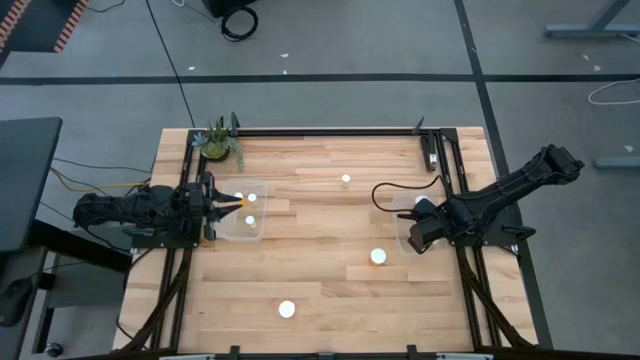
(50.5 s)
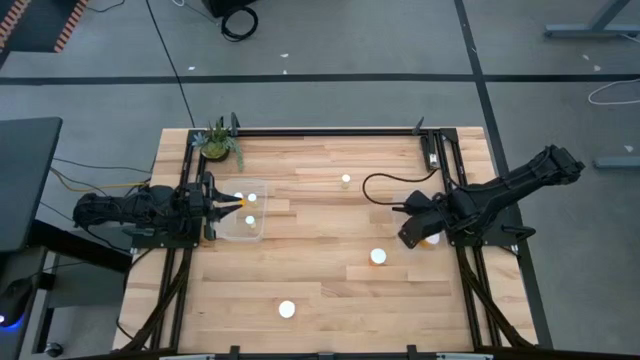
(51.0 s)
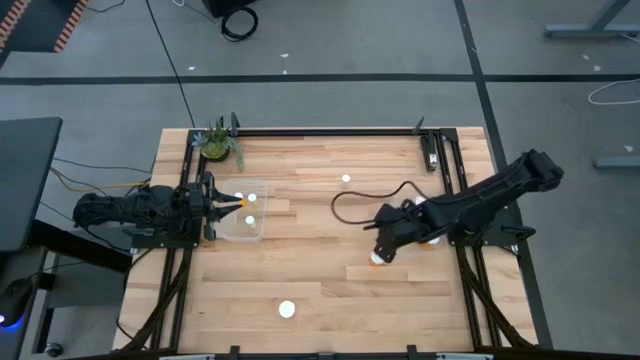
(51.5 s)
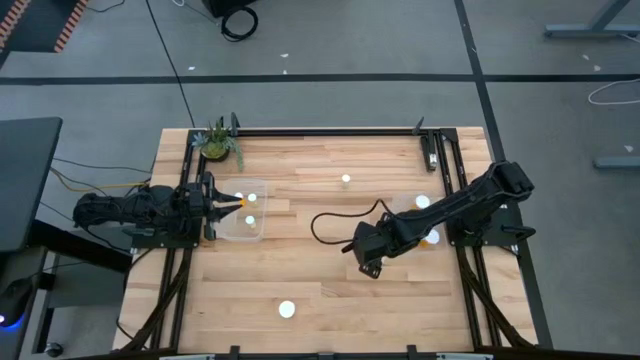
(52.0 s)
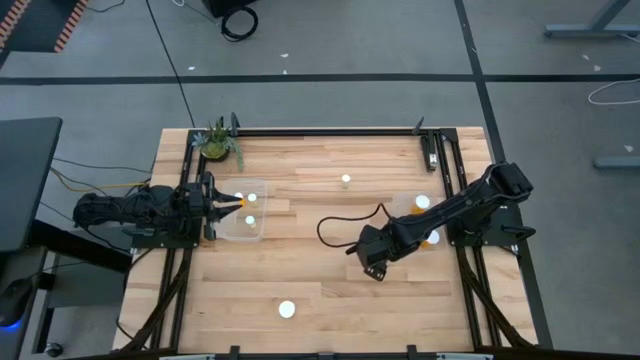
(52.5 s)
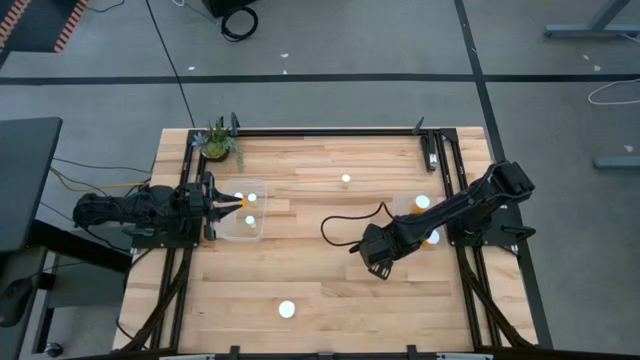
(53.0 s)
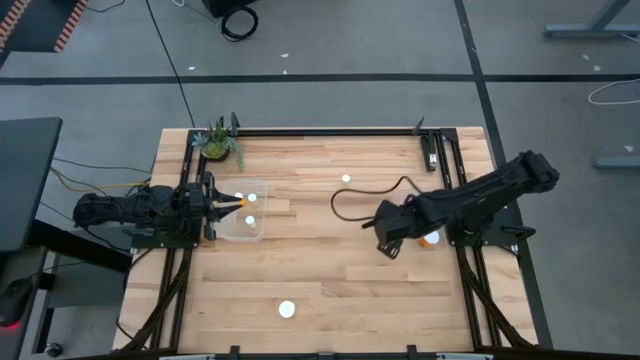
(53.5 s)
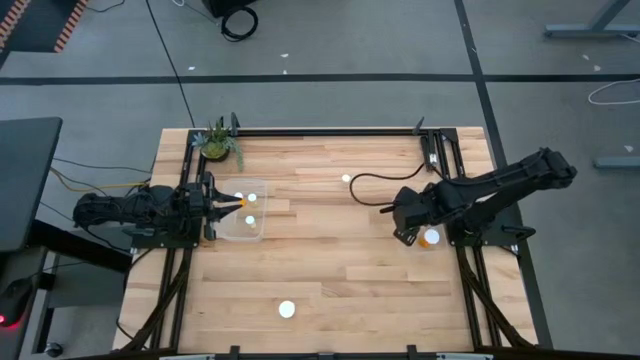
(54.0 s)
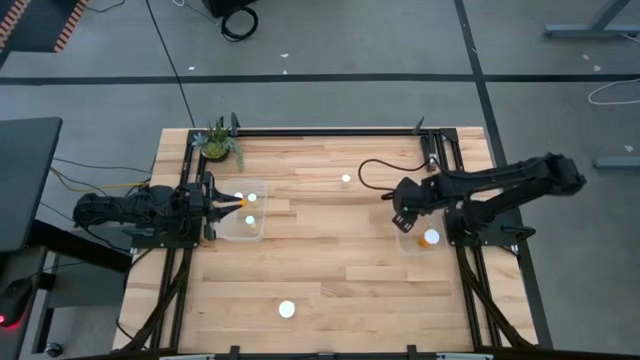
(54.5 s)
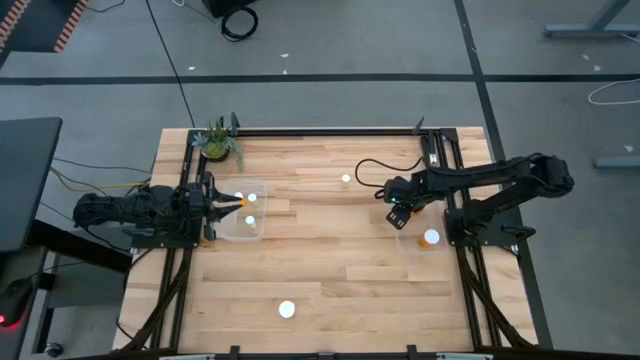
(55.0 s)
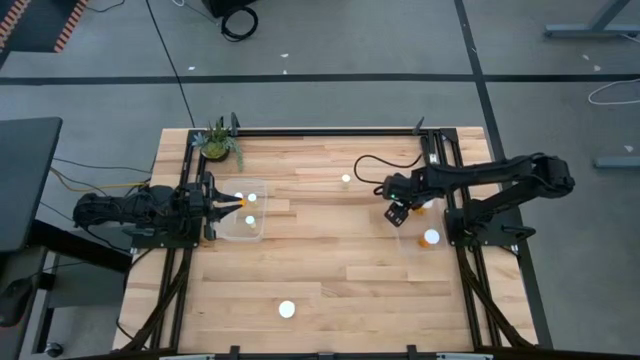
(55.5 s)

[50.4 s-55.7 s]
Task: Pick and place medicine bottles into bin by pill shape (circle, oval)
Put the large orange pill bottle into the right transparent bin

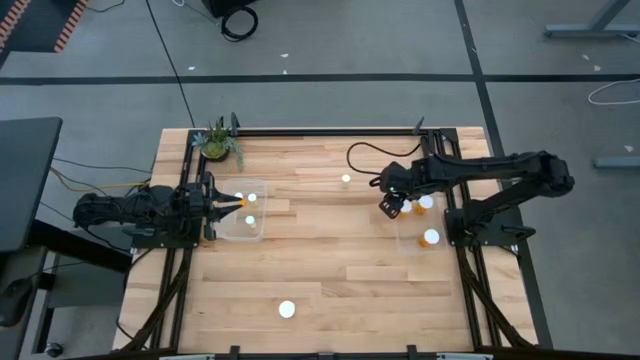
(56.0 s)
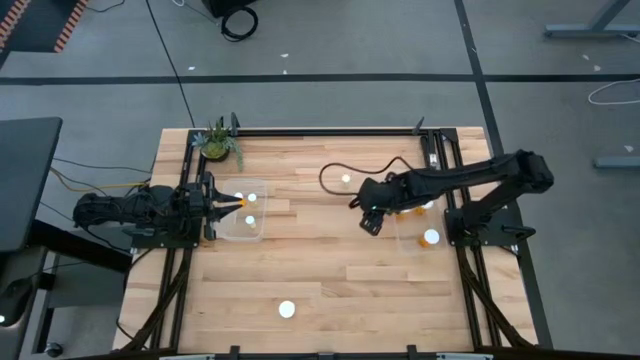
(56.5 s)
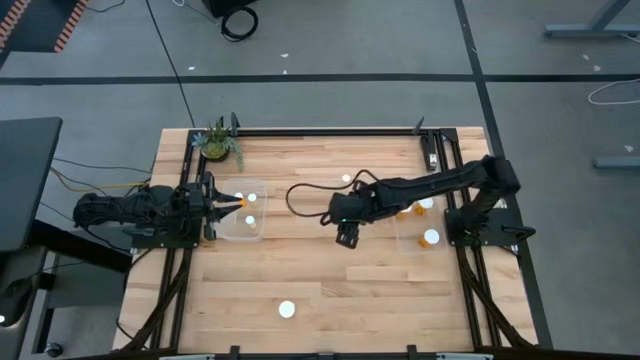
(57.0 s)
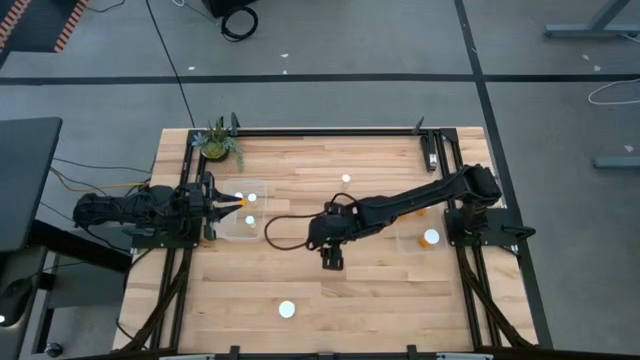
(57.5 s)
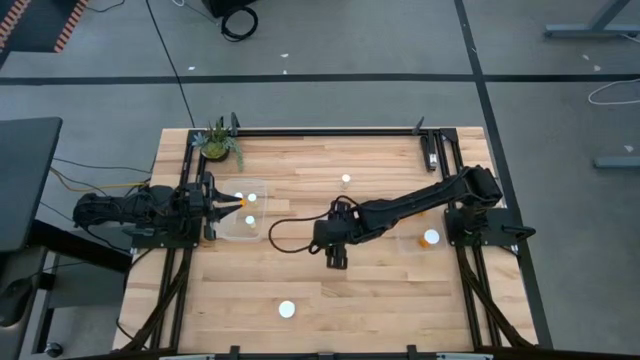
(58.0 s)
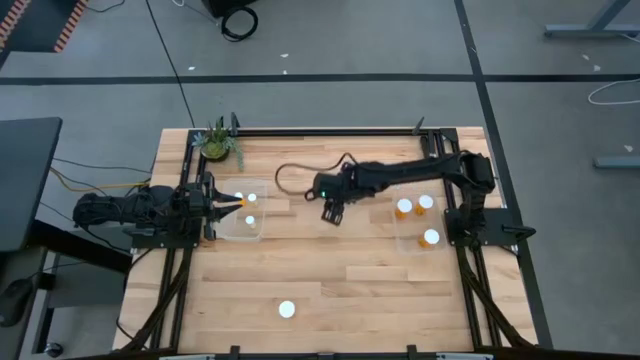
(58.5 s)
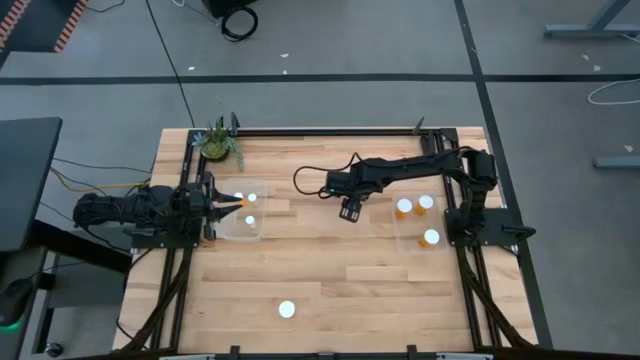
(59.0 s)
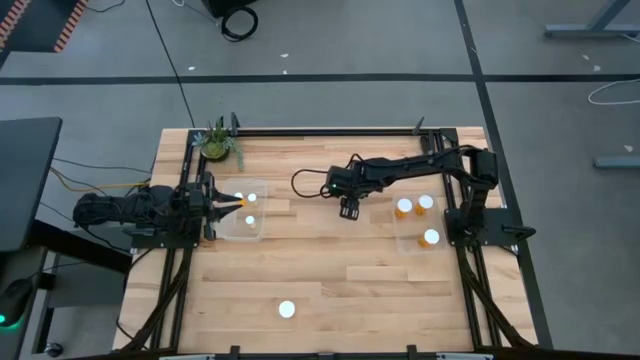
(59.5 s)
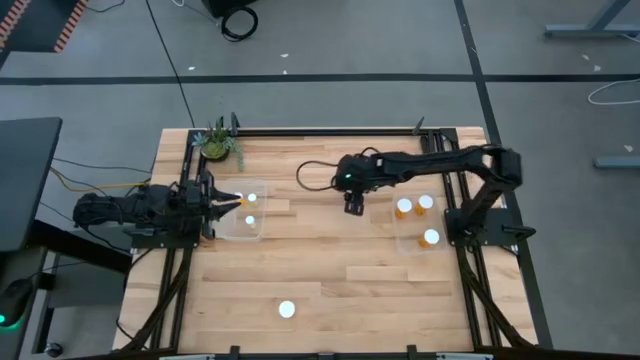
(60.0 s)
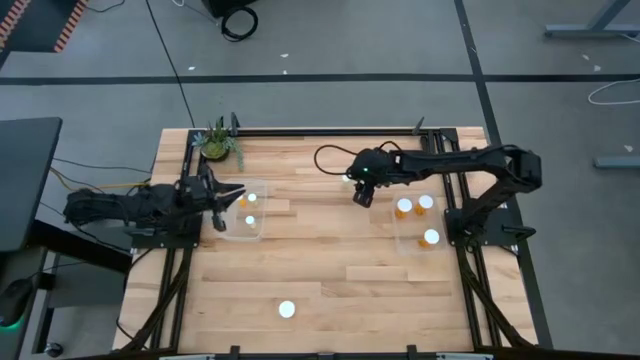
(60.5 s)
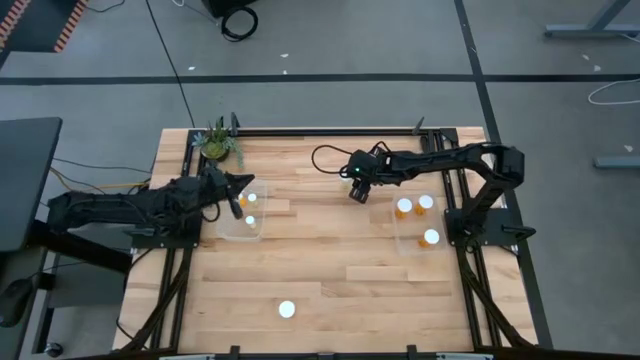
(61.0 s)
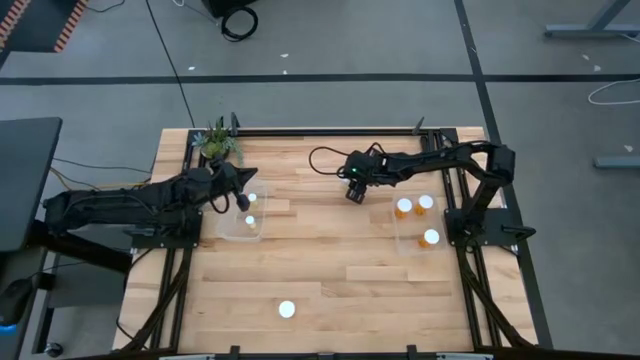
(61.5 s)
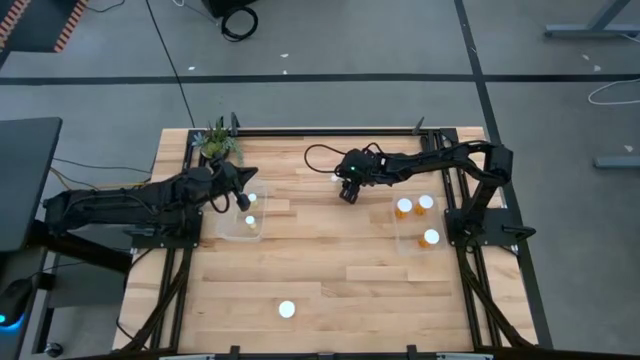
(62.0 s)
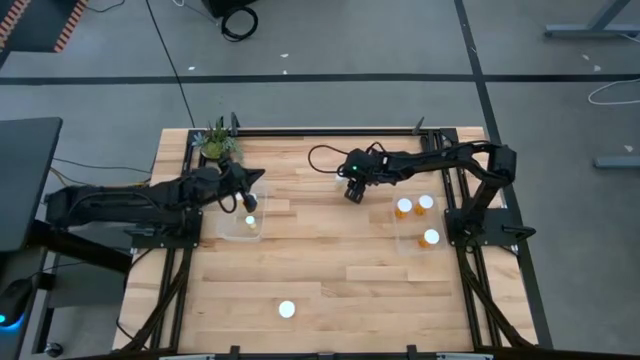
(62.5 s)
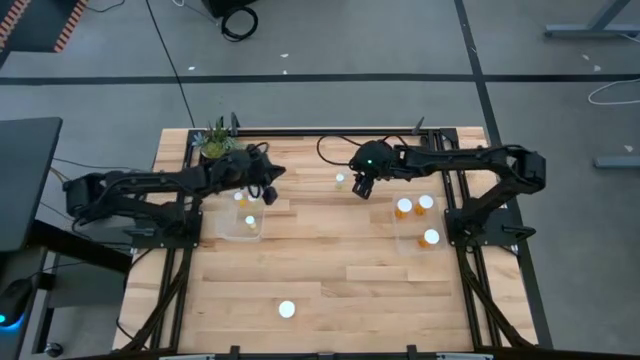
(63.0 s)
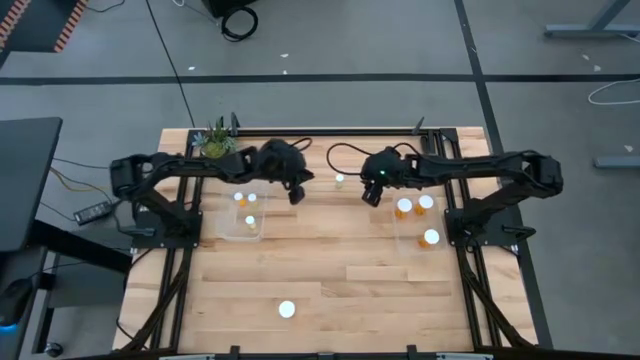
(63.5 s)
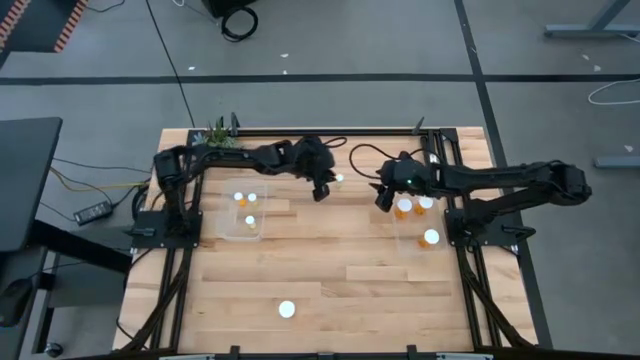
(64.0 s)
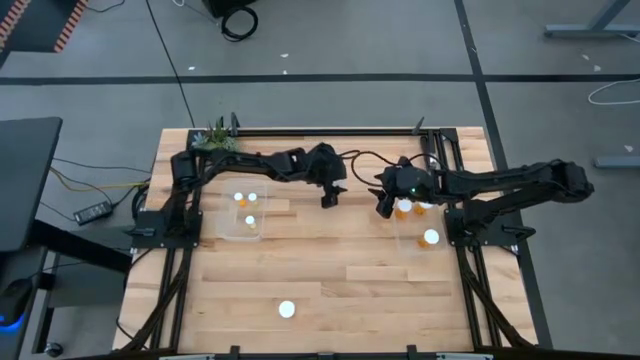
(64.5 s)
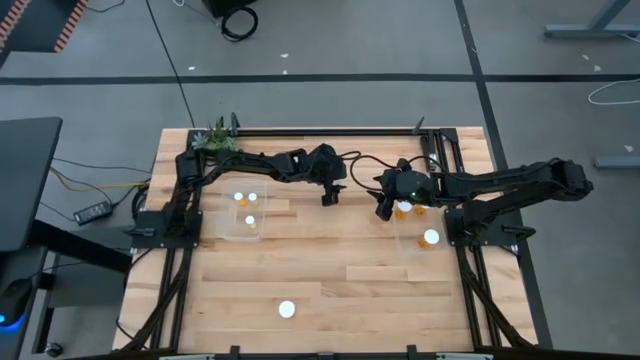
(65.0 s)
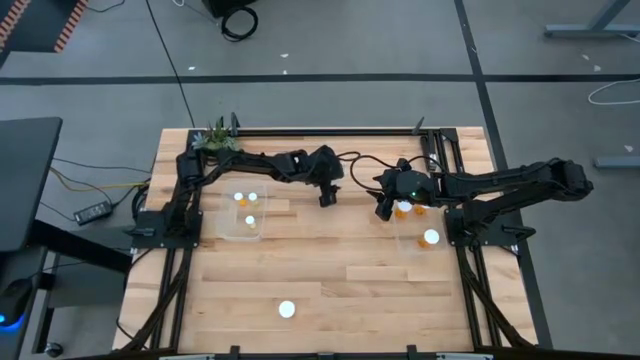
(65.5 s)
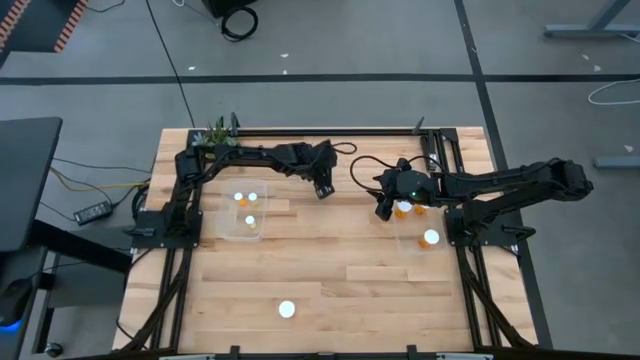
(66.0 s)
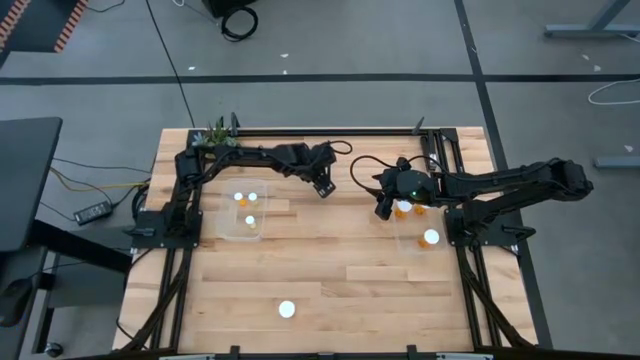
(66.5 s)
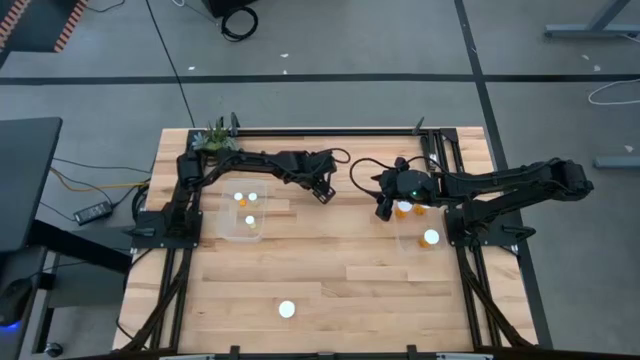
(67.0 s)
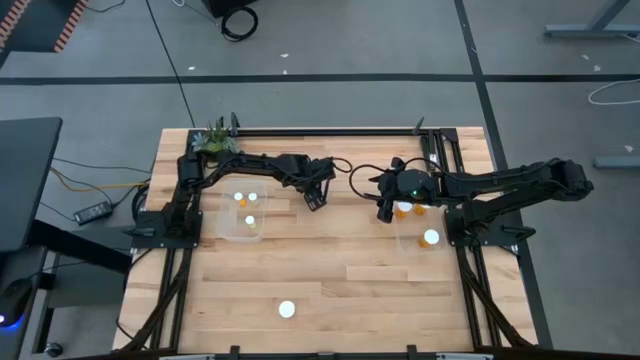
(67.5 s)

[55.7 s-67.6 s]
Put the yellow pill bottle into the left transparent bin

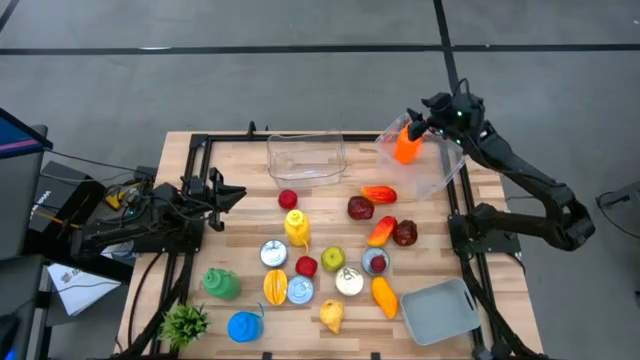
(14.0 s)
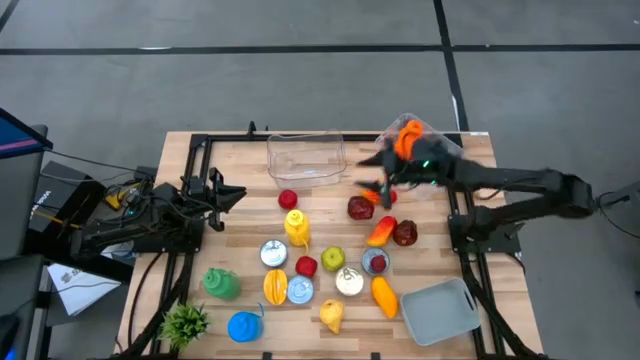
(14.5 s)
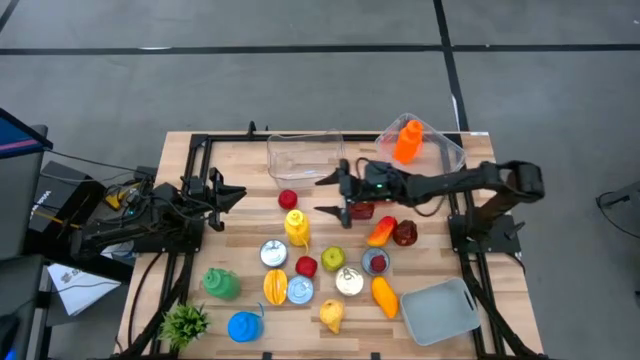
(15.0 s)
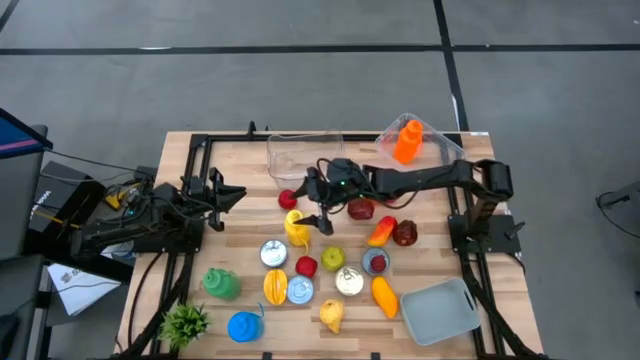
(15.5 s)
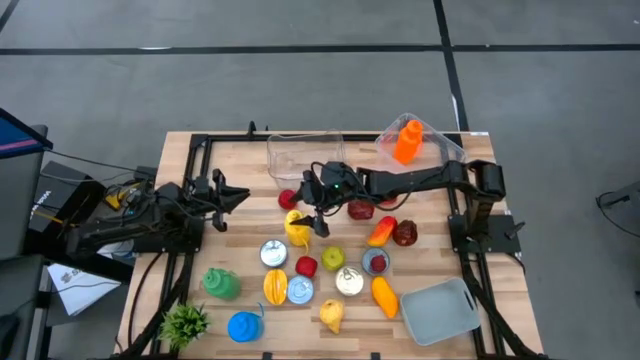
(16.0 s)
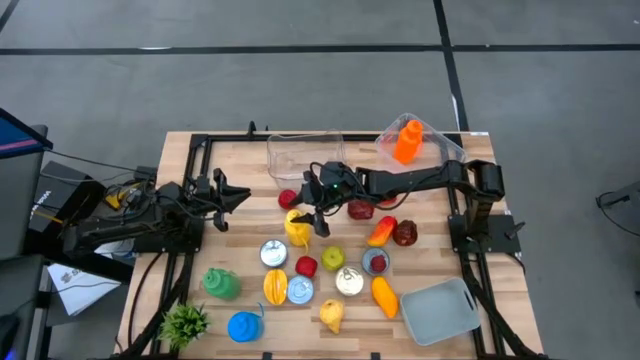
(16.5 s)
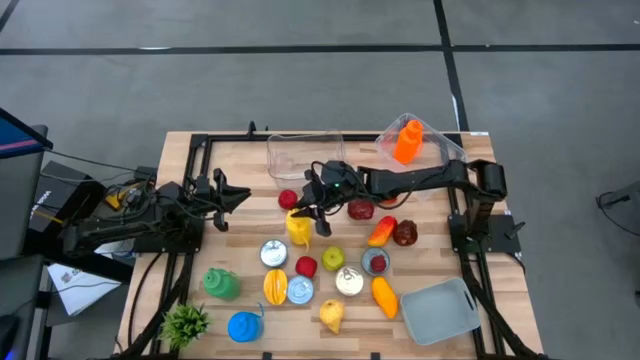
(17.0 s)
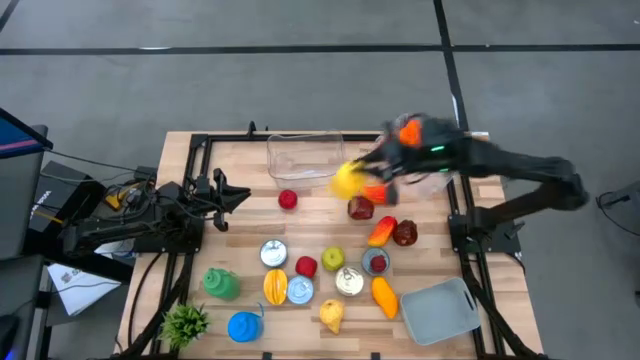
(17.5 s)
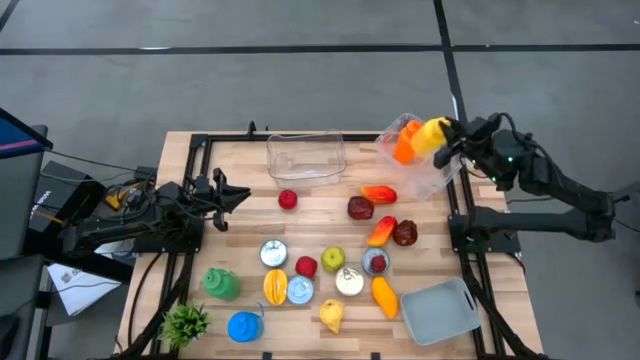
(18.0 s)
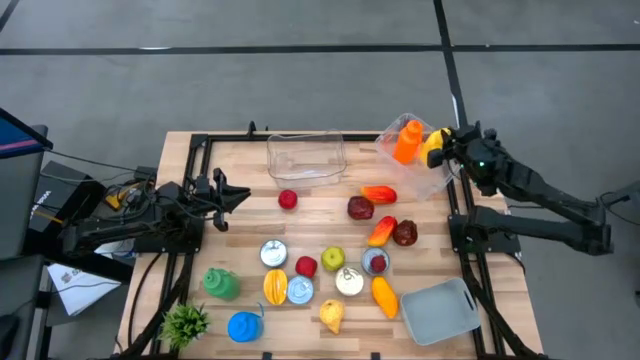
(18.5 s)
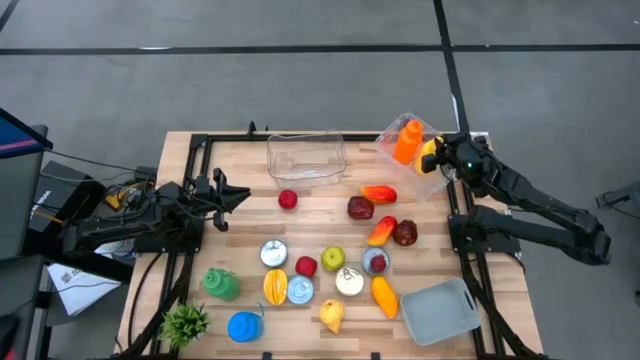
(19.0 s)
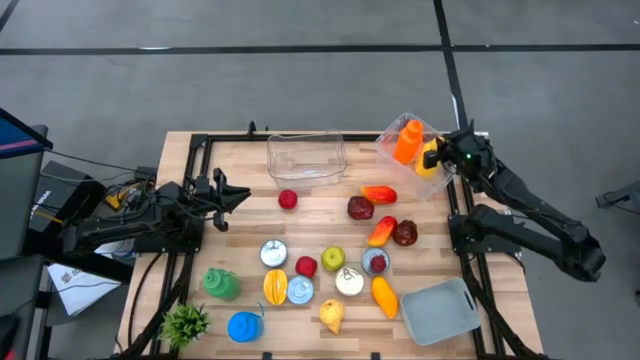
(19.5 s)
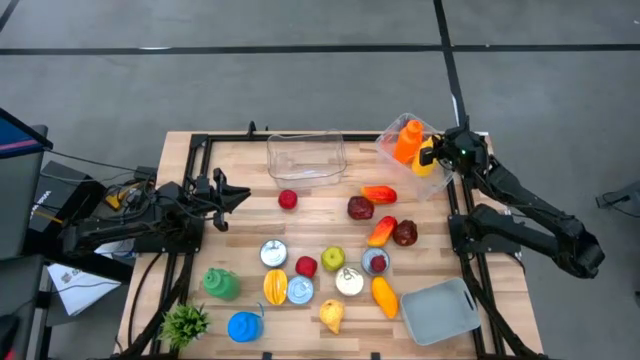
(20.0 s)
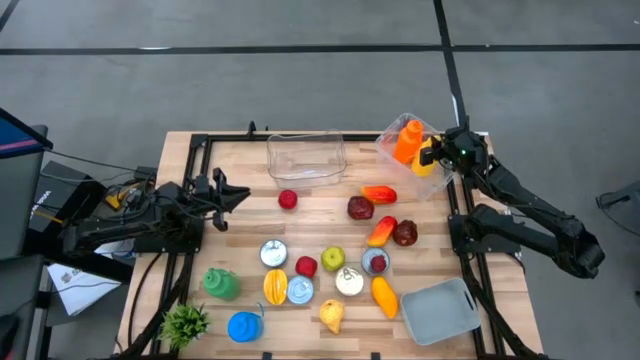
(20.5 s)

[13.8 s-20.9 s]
Task: Pick & Place Food Item
Put the yellow water bottle into the transparent container
